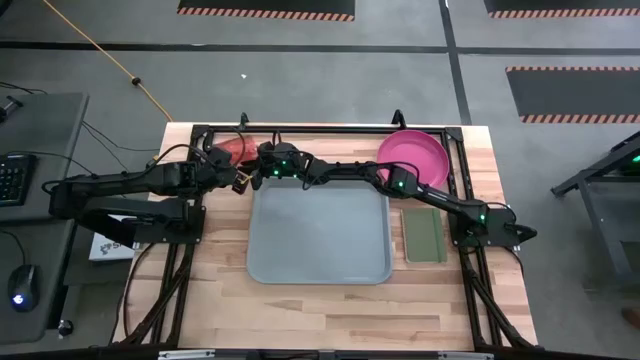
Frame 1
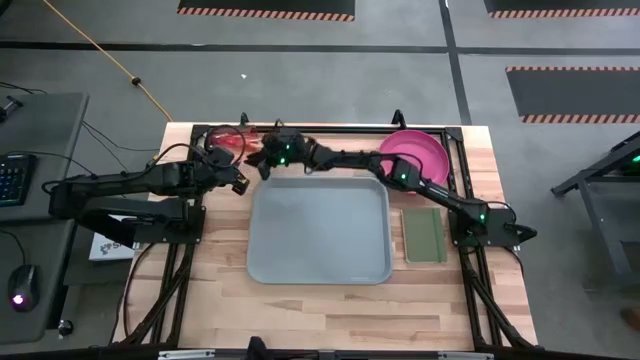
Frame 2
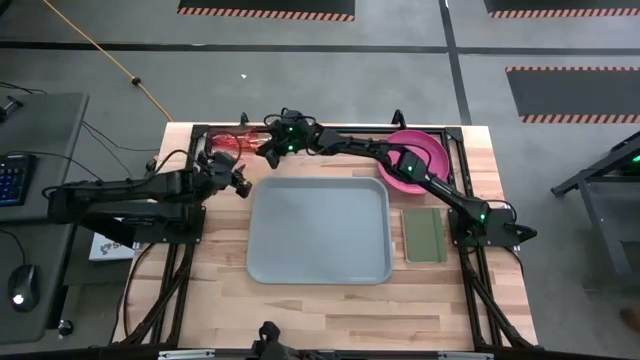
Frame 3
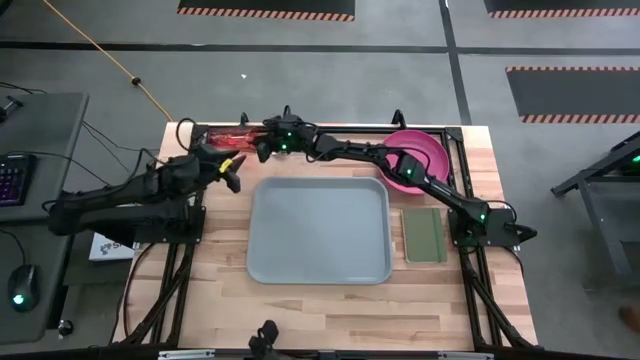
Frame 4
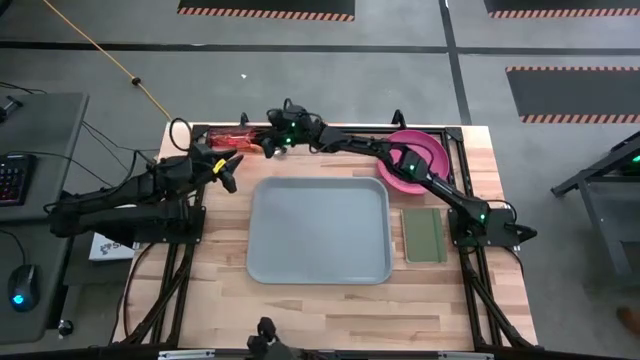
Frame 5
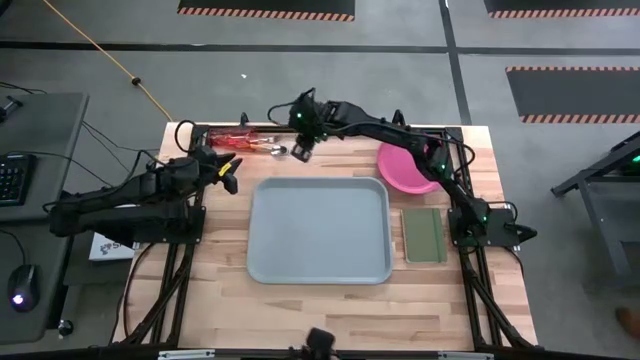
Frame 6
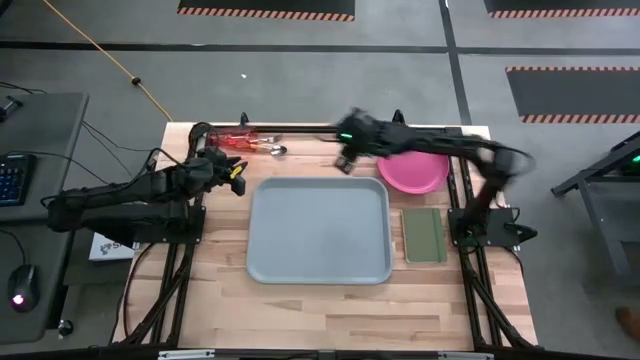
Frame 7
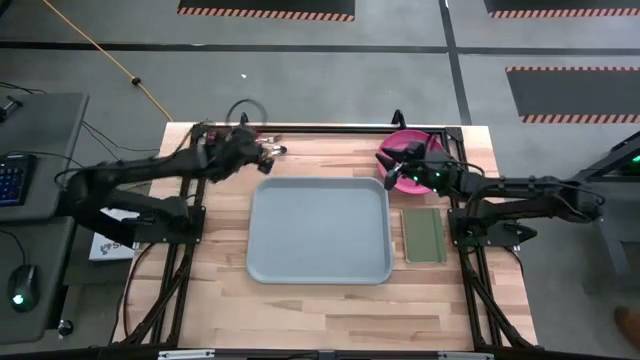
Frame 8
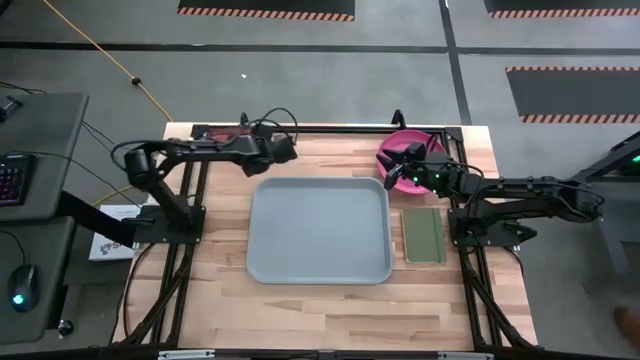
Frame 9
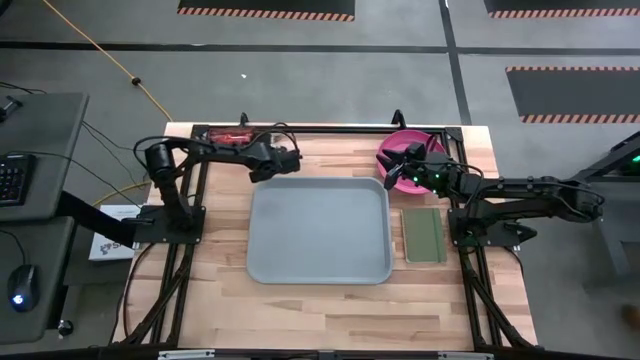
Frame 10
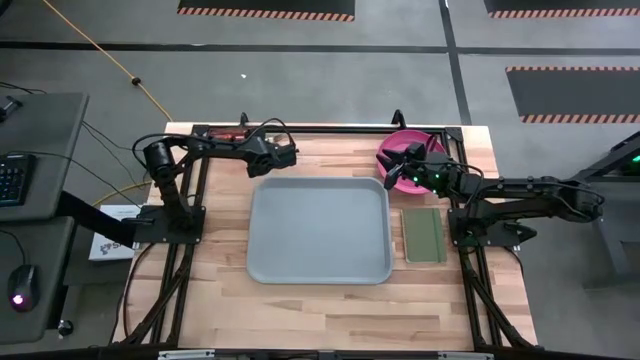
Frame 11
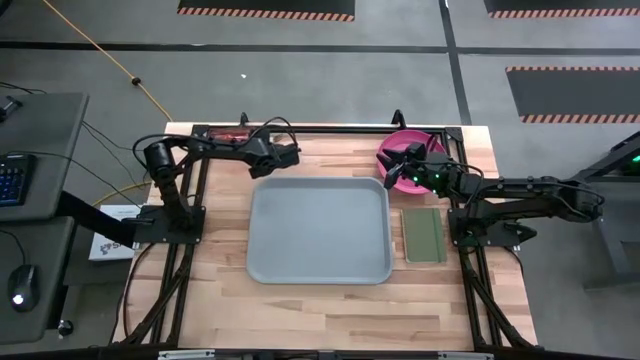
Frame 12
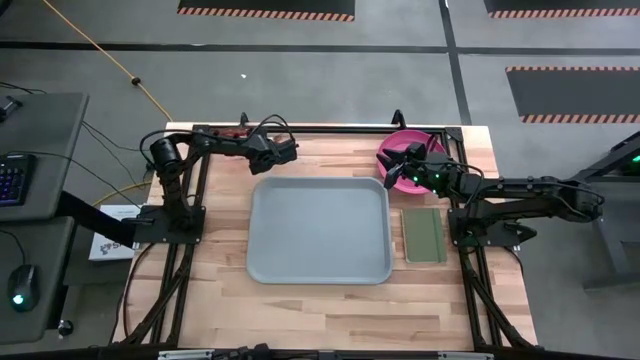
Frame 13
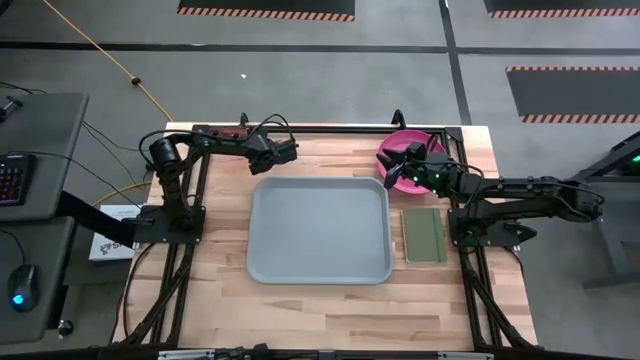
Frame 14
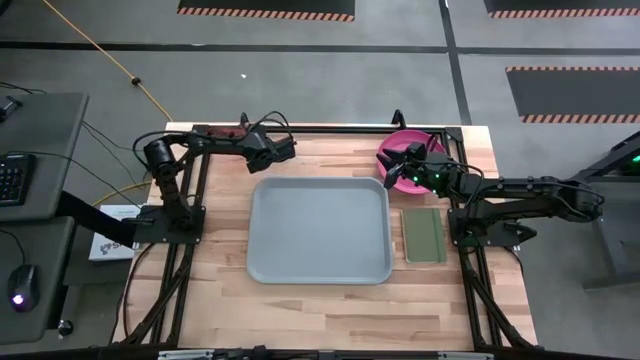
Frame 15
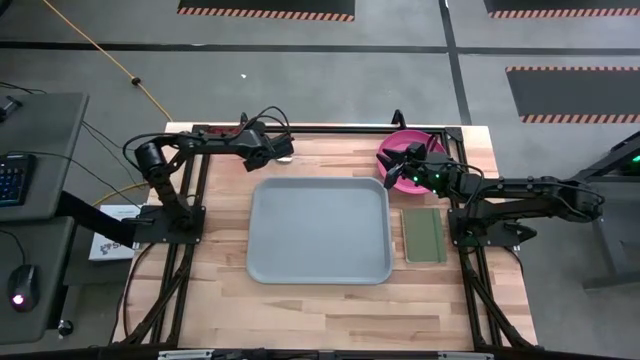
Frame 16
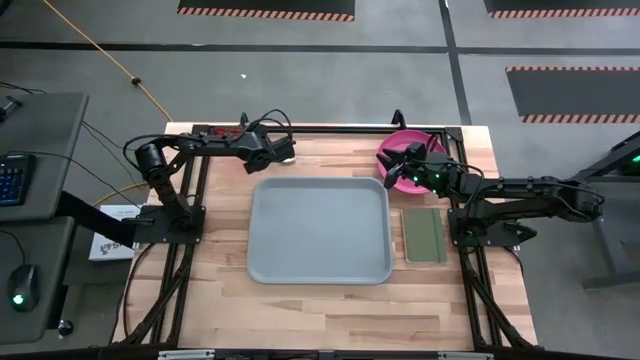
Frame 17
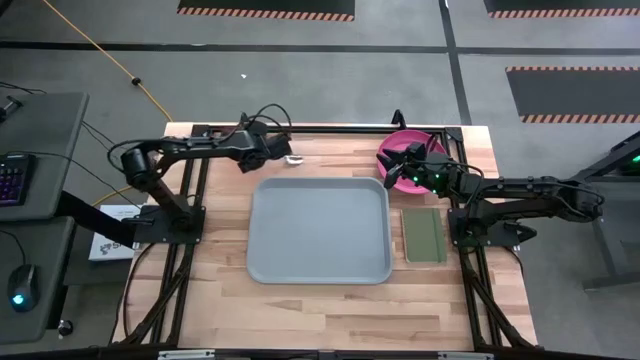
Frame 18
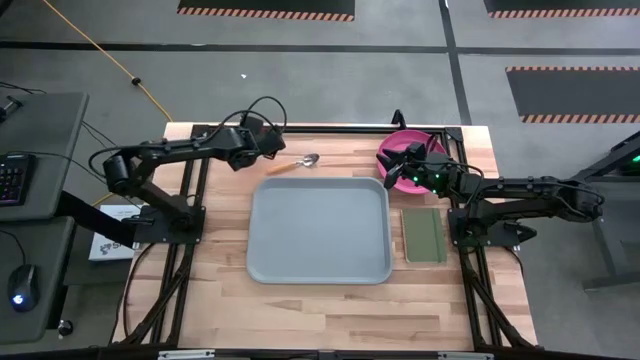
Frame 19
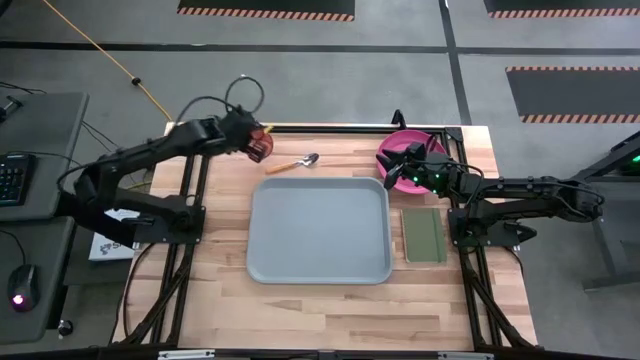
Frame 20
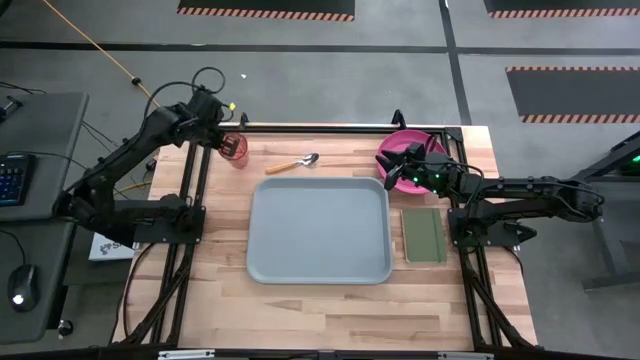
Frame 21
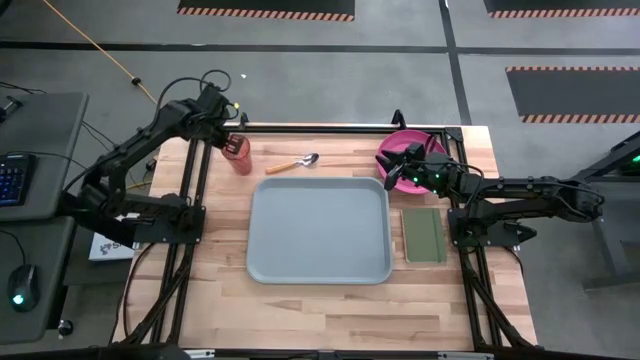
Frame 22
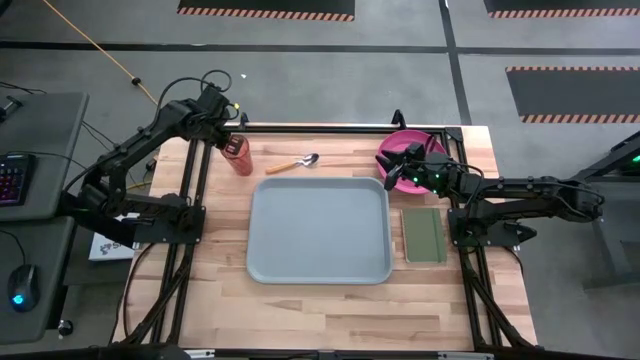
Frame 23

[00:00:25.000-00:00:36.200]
Task: Pick and place plate/cup/fork/spoon on tray
Adjust the brown cup

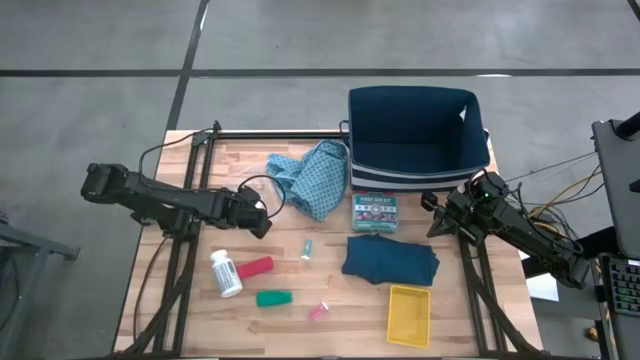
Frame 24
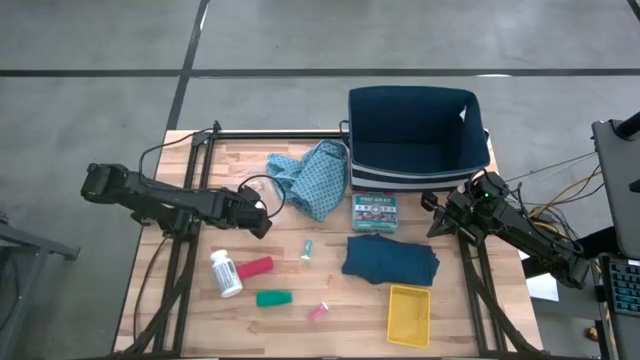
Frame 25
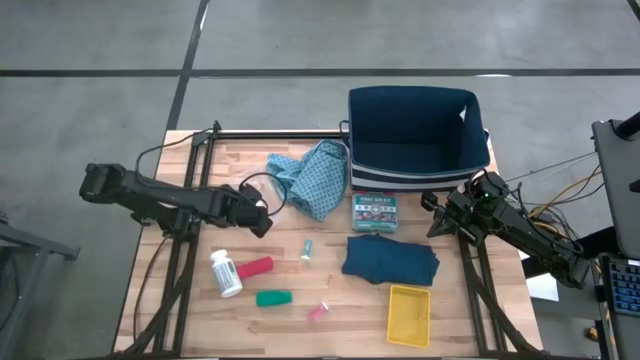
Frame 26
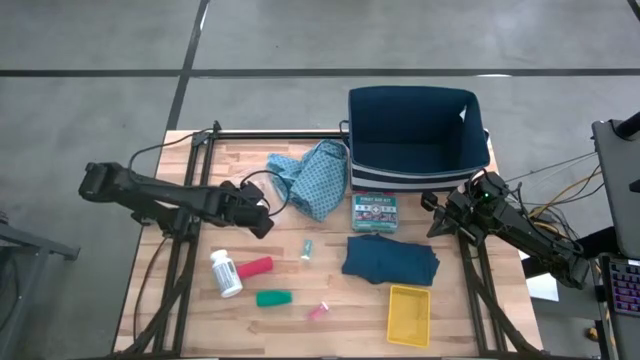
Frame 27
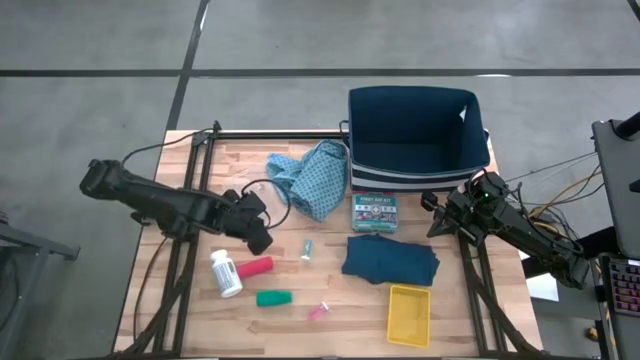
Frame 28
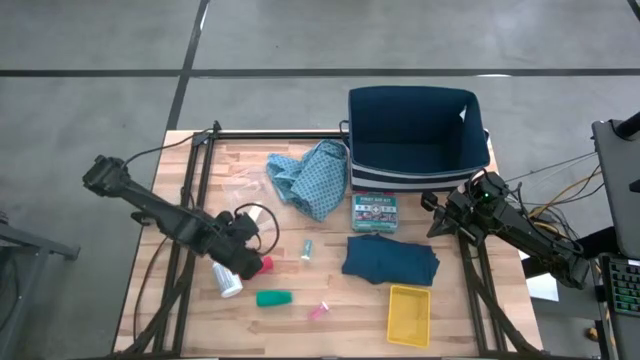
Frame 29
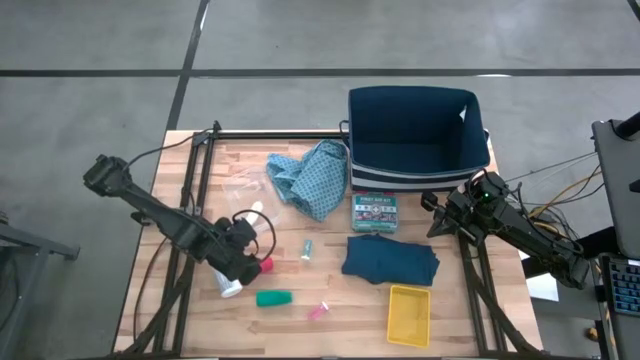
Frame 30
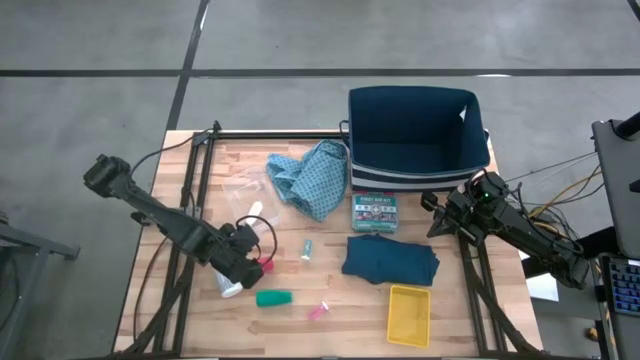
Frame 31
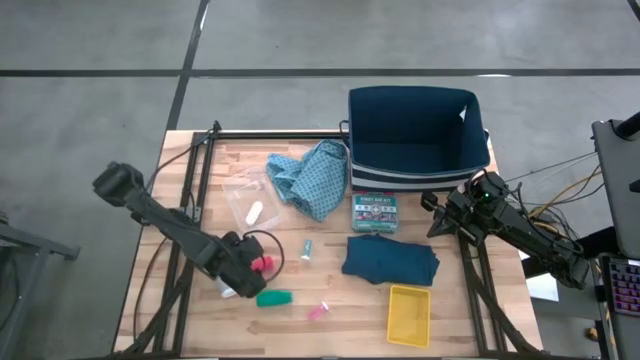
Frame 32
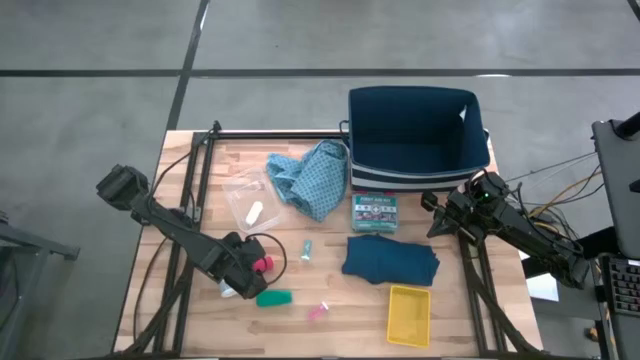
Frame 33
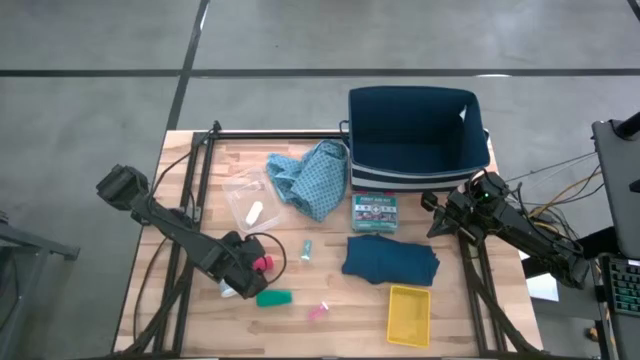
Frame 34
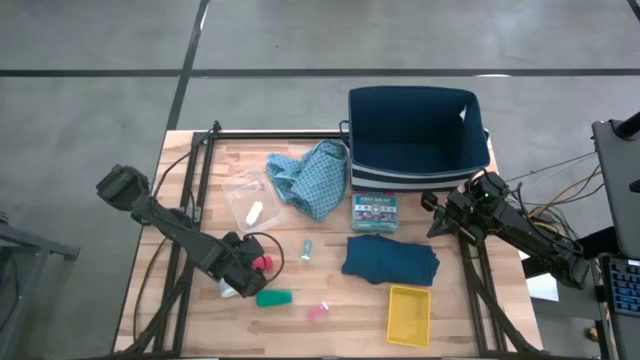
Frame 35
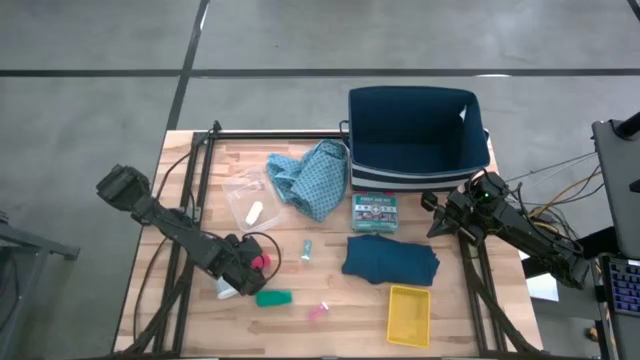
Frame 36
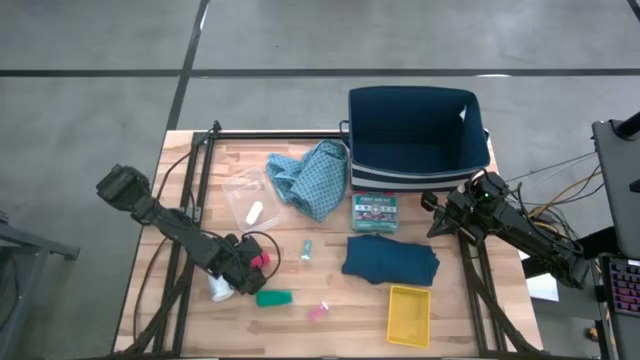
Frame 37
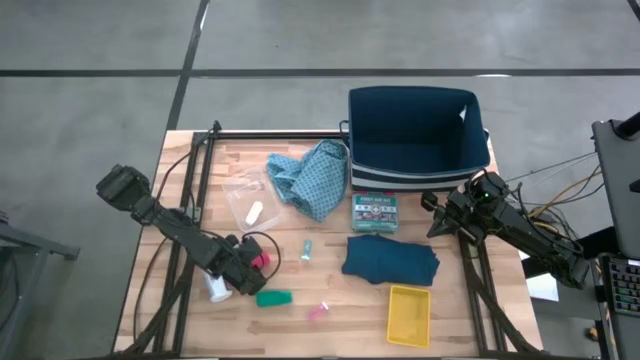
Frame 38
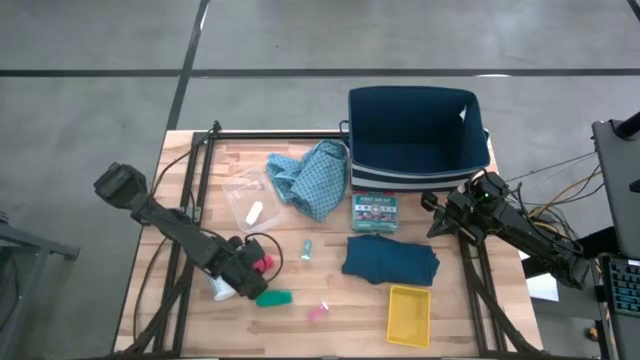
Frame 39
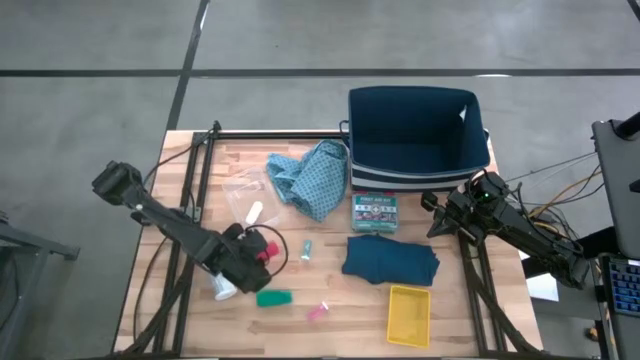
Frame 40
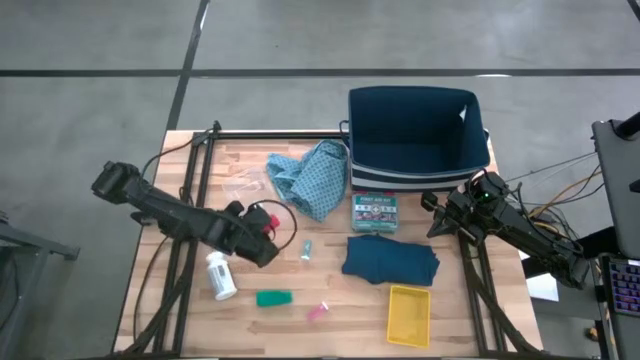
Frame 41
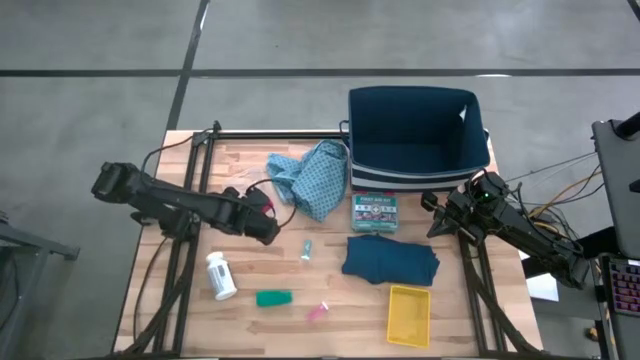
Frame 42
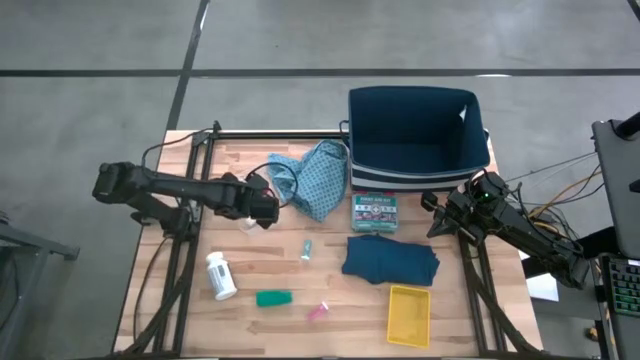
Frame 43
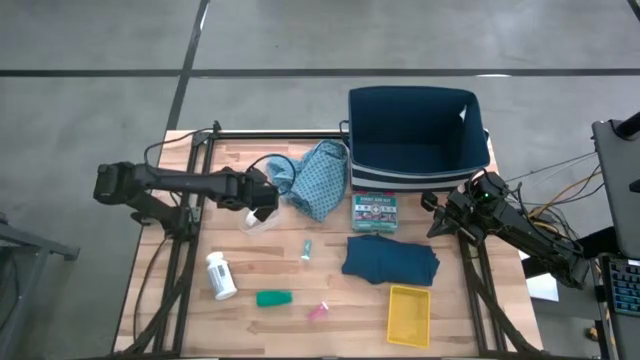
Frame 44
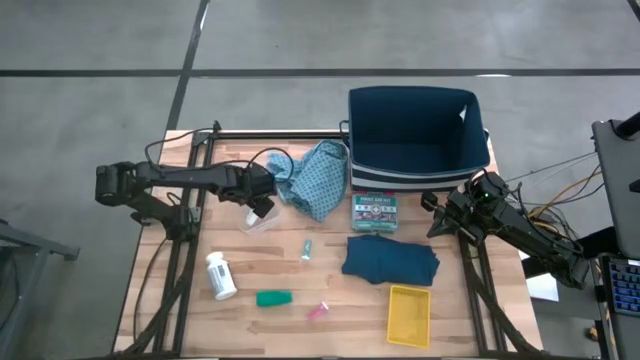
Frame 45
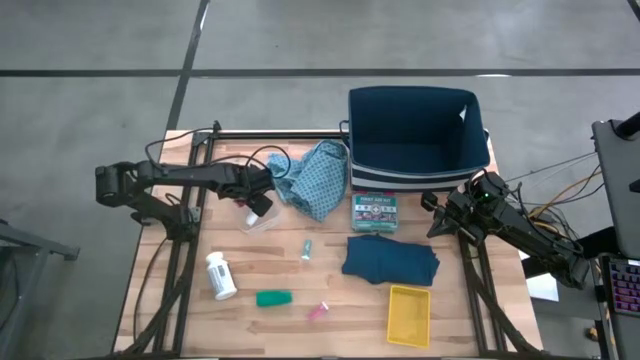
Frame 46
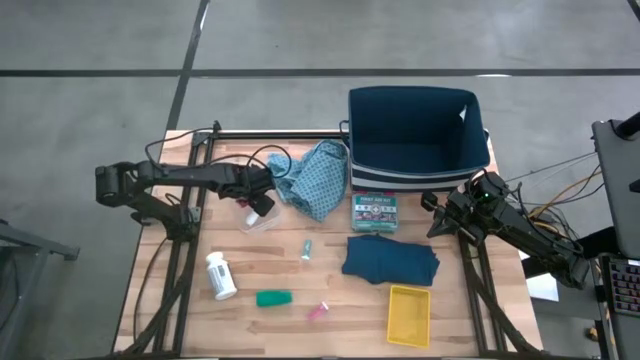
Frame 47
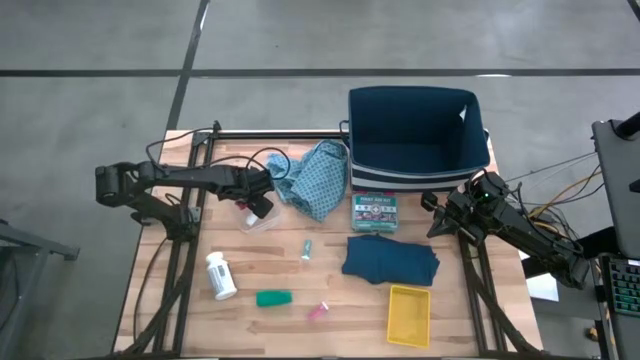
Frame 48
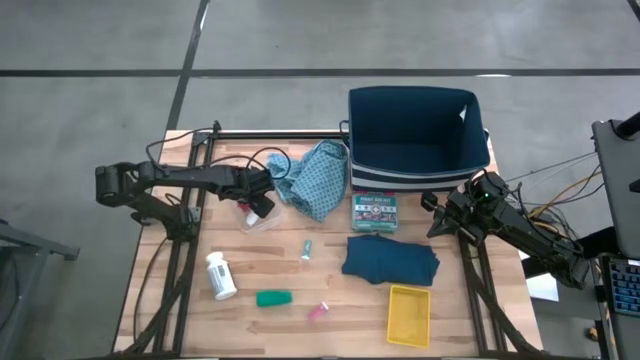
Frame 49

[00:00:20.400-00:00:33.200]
Task: Pick & place medical supplies in basket/bin
Put the red bandage into the transparent bin
